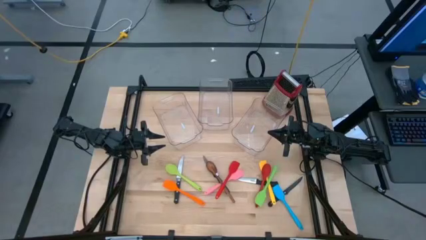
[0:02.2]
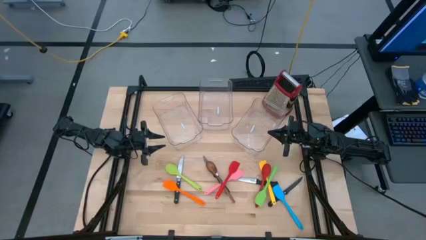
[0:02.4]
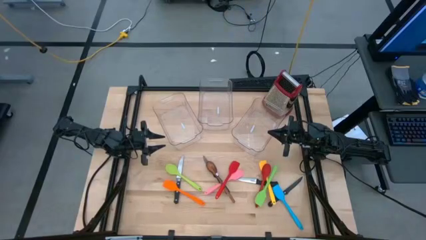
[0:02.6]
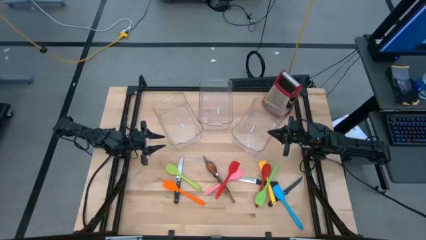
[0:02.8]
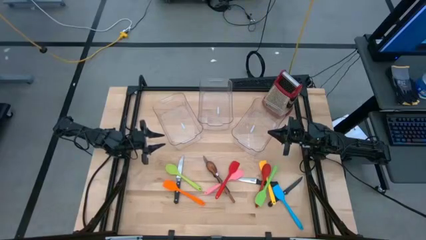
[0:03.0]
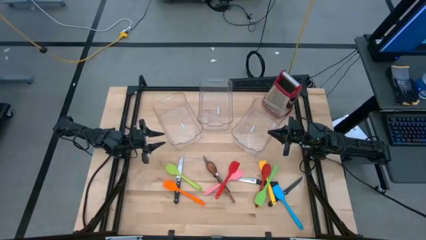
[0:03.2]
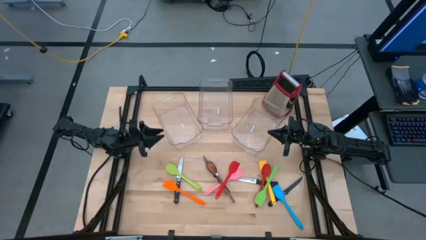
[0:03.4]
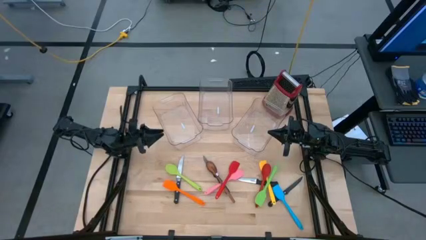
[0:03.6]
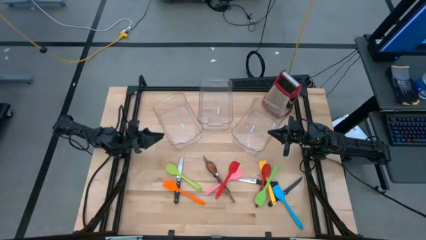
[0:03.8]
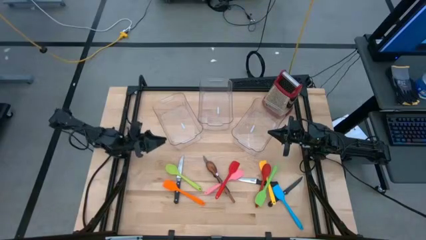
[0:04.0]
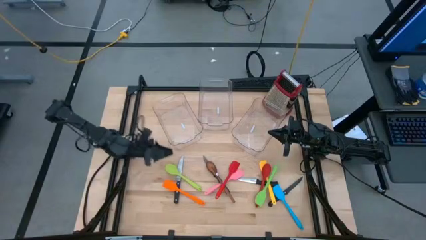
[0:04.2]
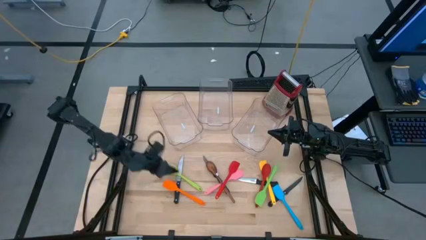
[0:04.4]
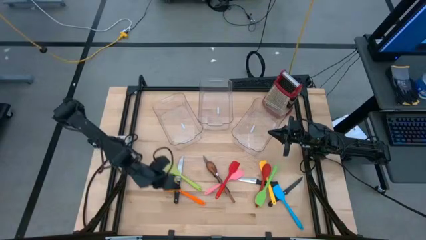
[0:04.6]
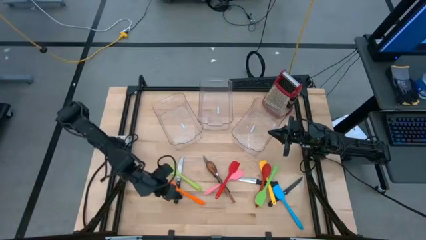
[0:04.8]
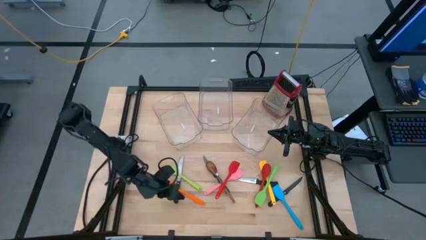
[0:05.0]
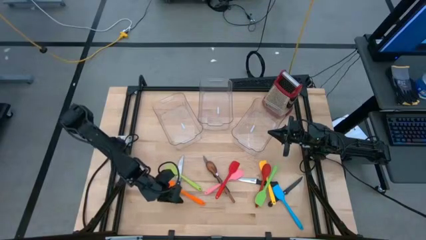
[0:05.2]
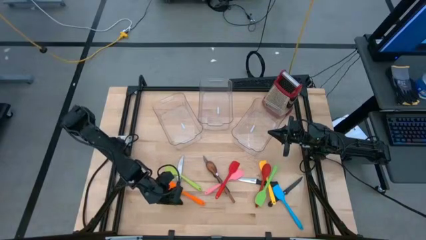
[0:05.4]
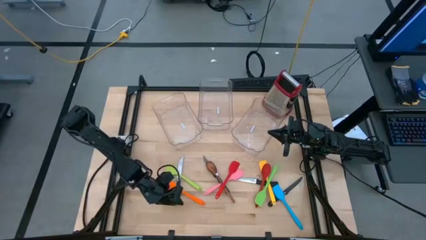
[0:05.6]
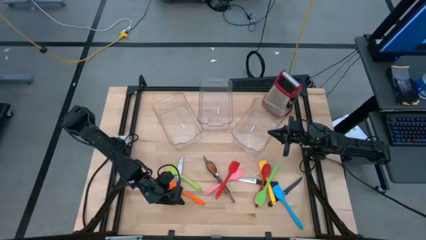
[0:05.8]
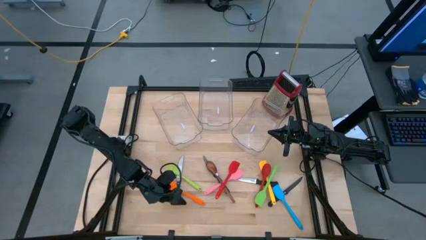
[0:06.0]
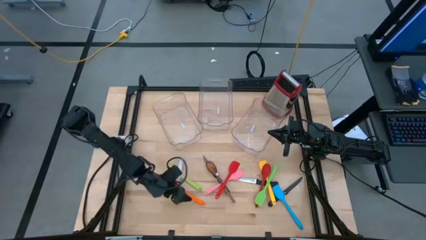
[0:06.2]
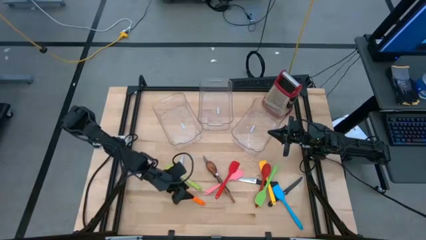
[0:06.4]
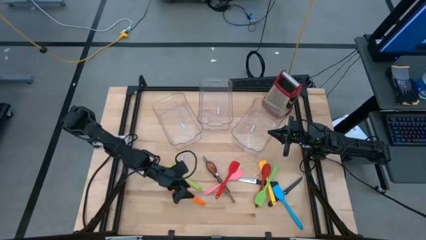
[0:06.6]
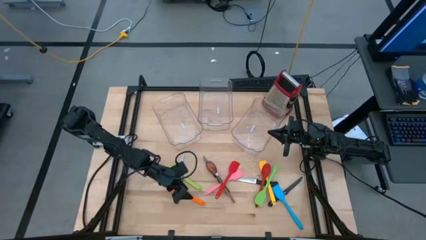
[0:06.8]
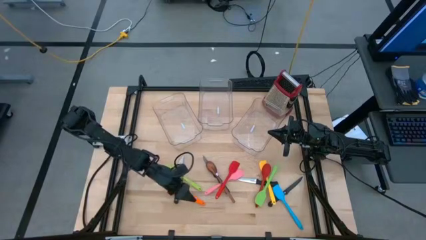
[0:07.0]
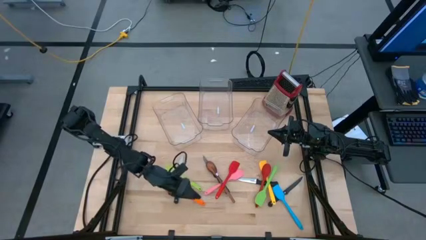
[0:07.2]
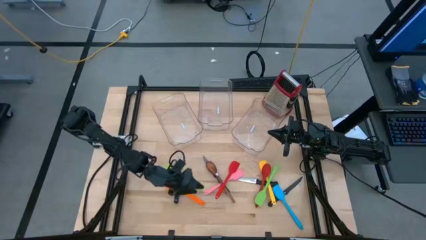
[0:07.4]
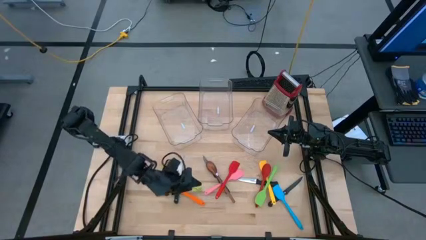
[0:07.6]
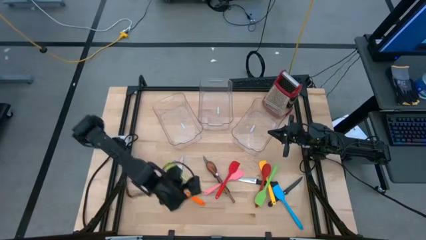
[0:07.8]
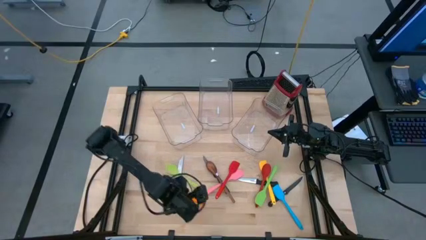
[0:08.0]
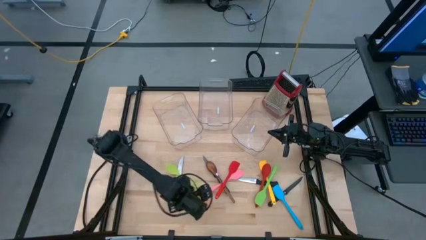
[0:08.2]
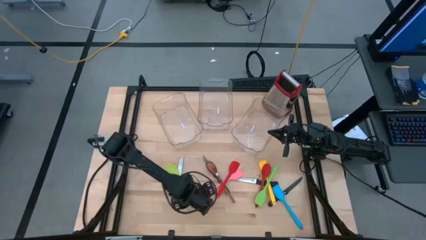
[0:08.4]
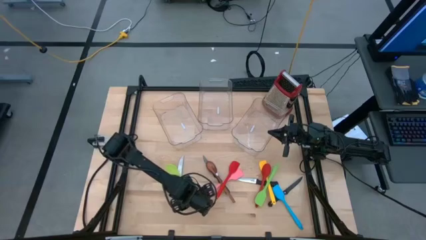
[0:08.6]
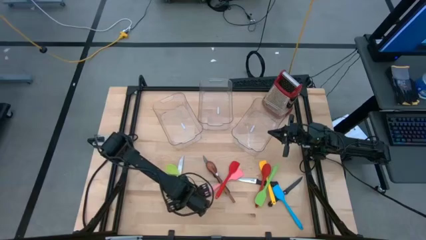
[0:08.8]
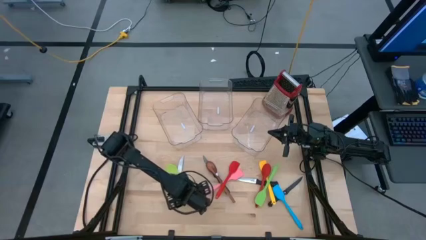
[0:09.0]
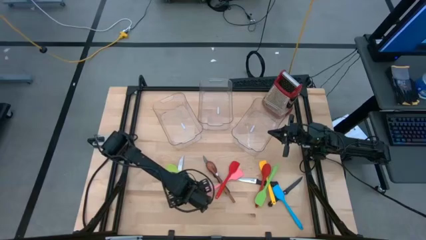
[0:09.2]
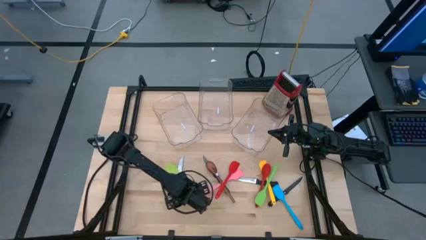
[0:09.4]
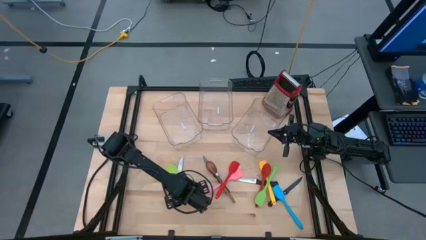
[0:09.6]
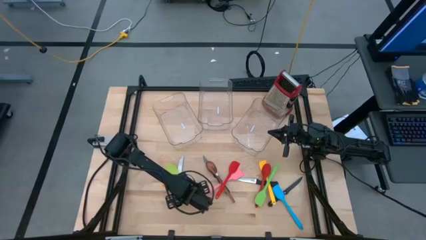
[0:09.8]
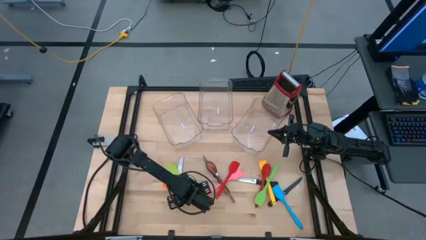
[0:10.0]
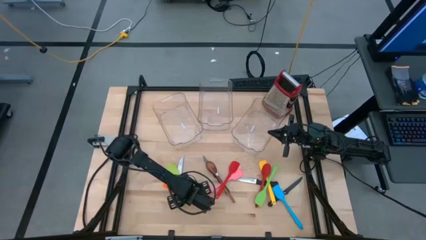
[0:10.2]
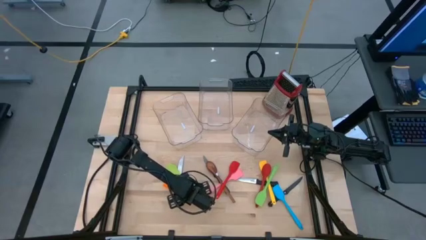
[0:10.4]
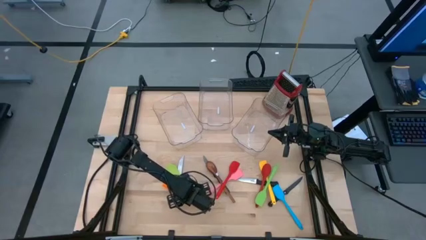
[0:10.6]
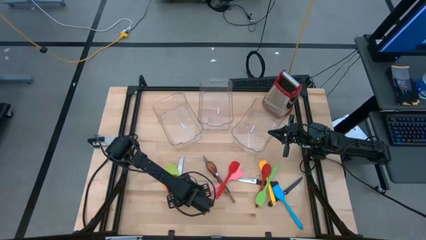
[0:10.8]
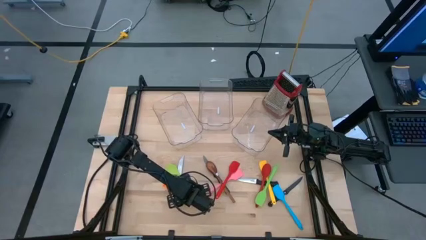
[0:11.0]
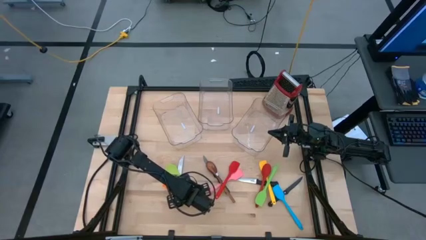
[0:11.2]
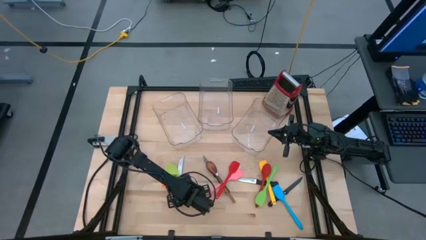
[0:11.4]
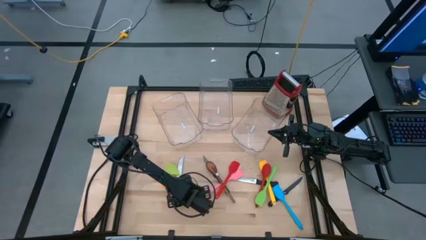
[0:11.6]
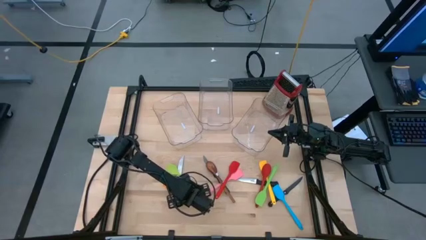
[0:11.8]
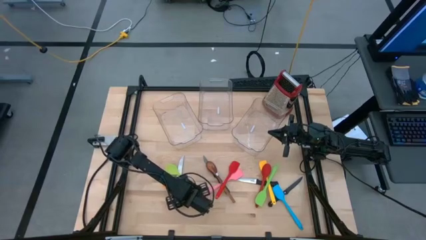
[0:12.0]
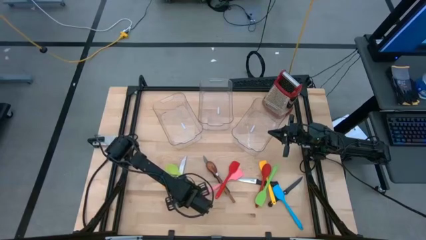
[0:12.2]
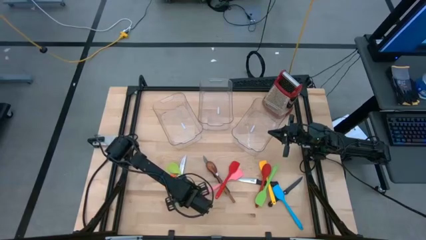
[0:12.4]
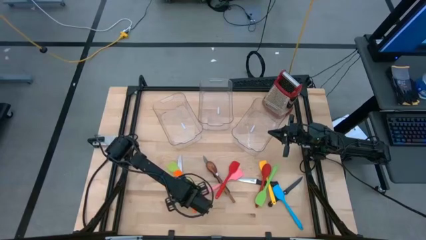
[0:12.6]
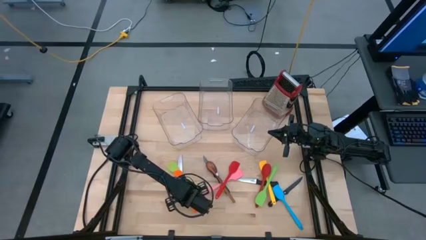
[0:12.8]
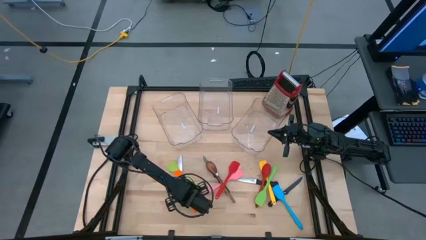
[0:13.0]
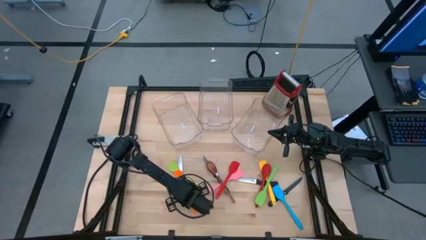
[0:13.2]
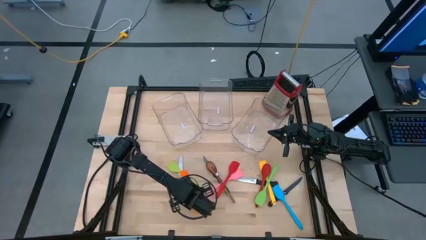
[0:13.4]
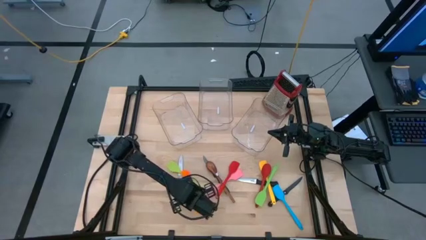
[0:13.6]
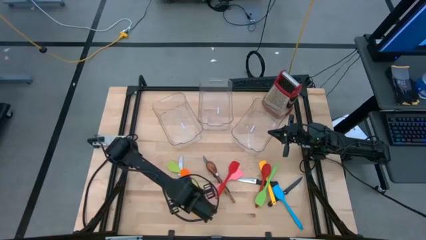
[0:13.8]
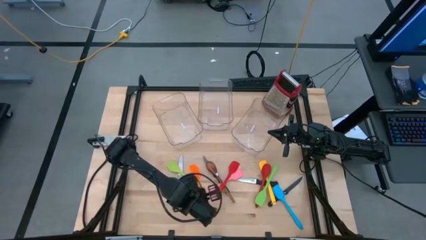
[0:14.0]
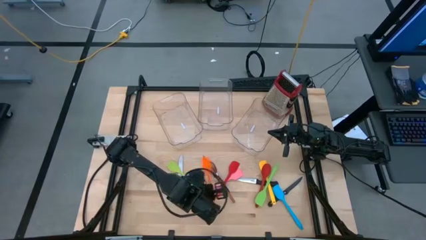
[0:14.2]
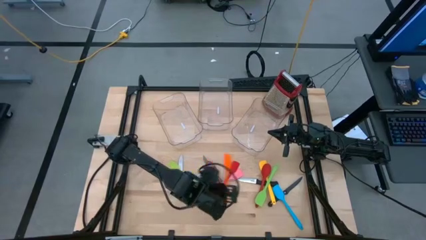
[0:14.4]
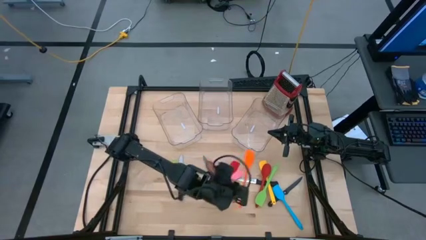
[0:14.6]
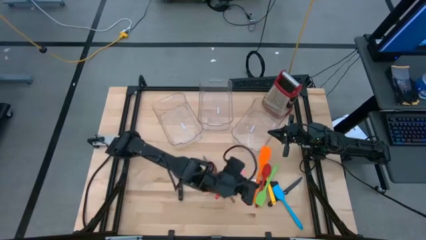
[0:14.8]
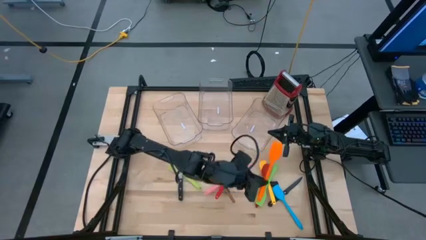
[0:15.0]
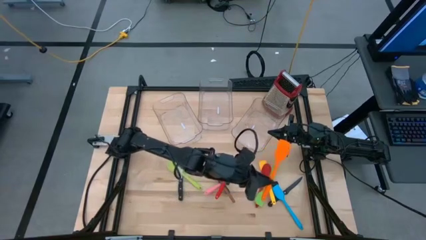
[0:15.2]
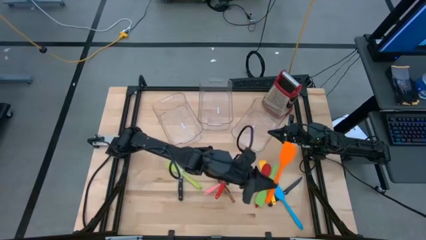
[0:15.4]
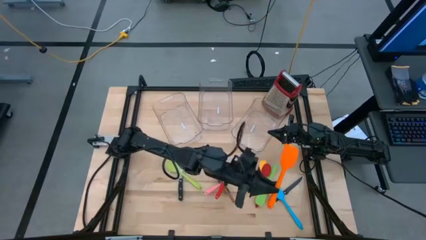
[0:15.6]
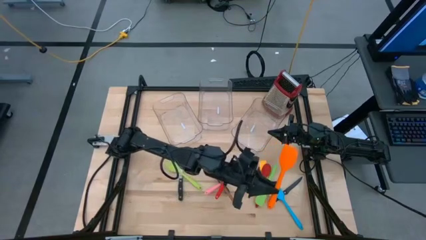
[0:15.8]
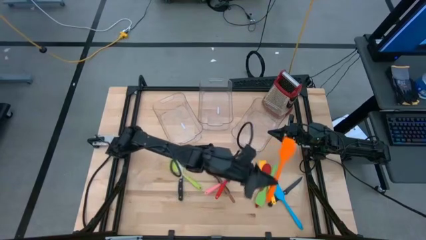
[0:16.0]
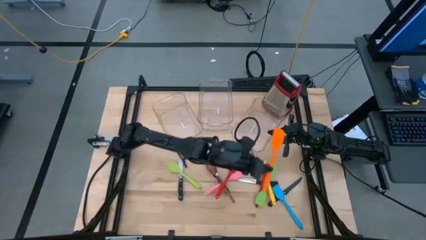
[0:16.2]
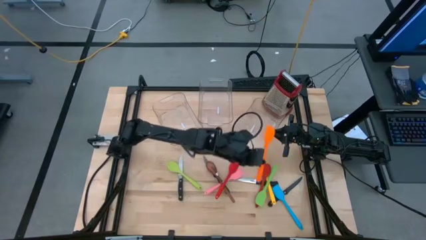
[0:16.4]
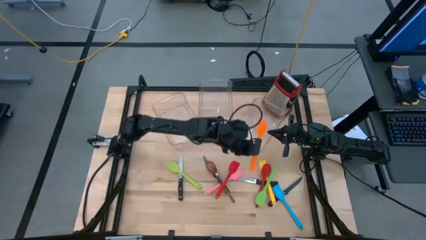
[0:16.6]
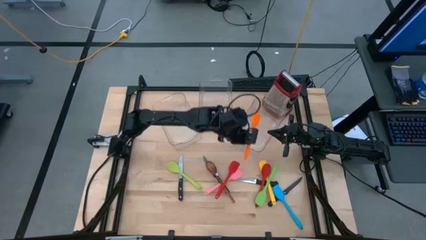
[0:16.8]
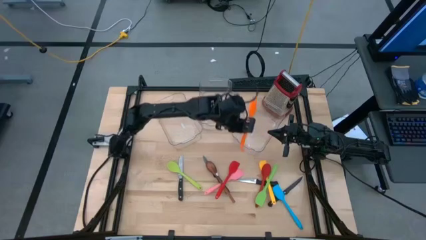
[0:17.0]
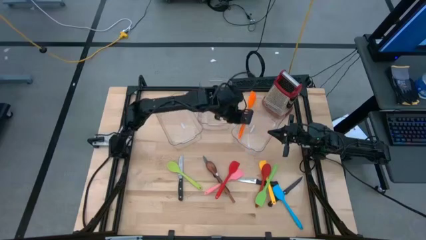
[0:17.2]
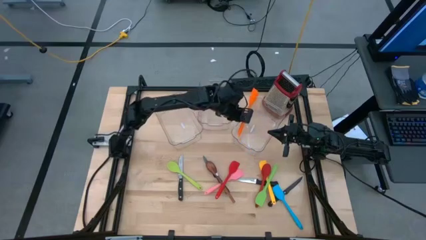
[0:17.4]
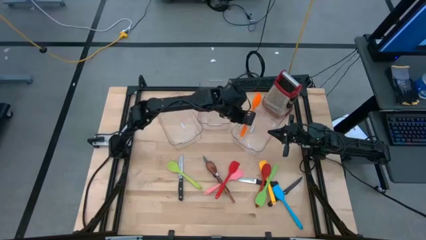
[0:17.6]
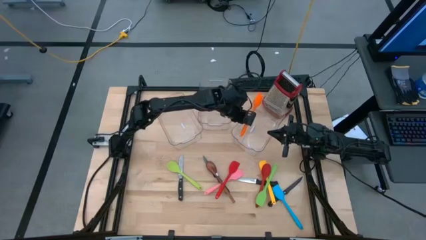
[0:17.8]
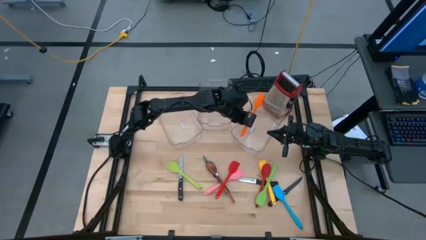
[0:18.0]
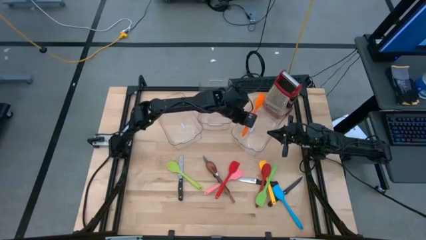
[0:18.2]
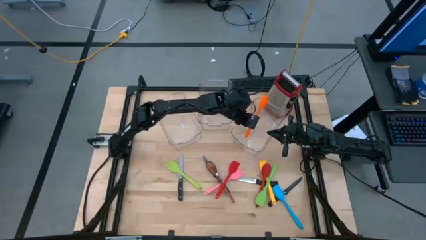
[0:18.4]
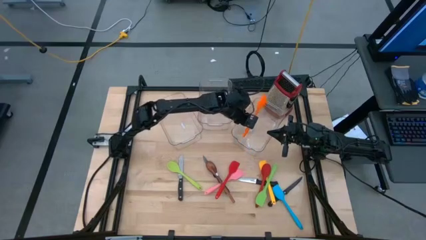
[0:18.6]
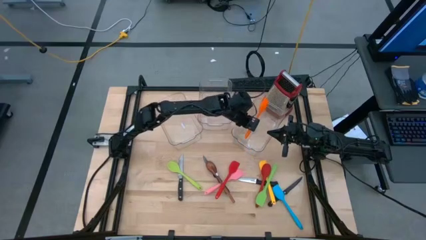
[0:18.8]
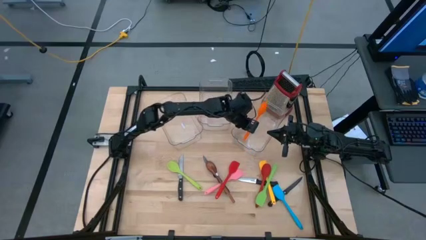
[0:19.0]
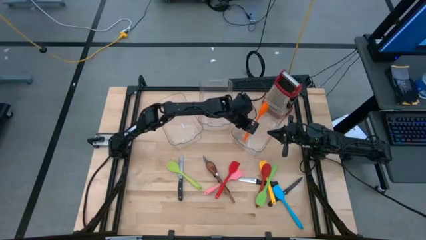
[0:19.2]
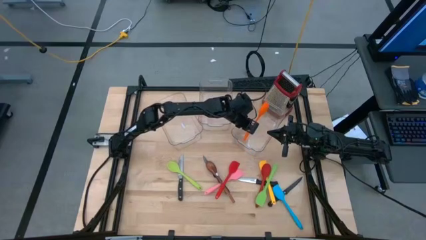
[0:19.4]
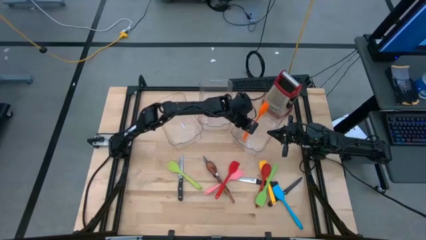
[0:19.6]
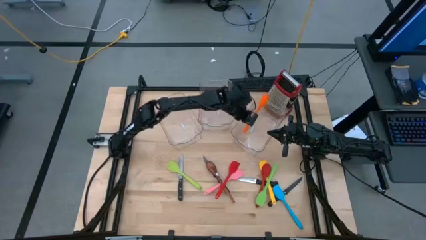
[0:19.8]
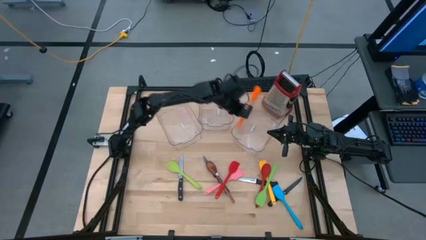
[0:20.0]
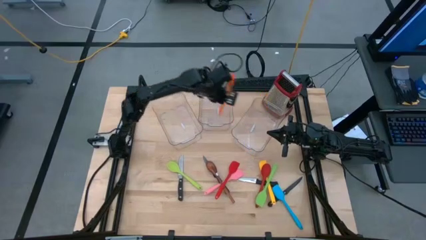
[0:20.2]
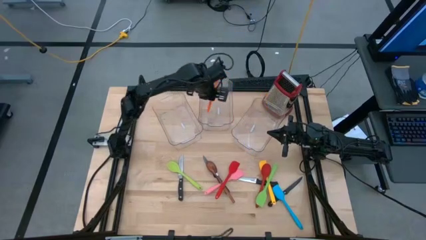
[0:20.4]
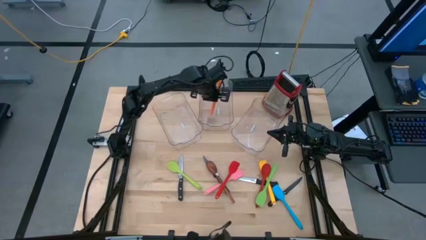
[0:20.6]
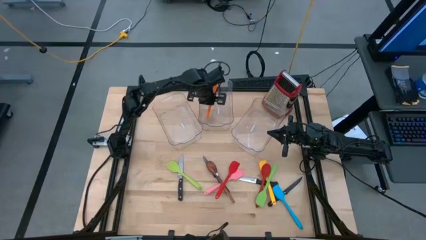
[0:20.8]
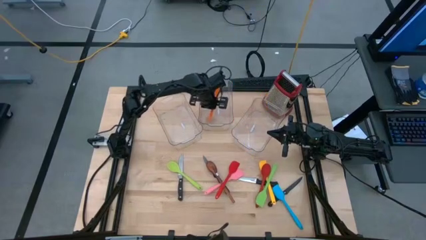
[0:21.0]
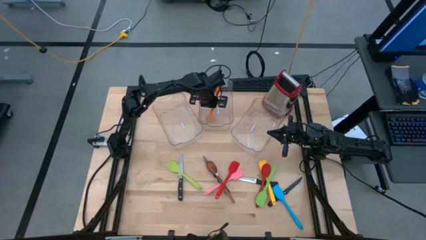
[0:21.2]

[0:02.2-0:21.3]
Task: Pick & Place Kitchen Items
Put the orange spatula in the middle bin
